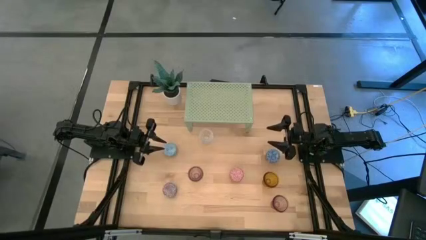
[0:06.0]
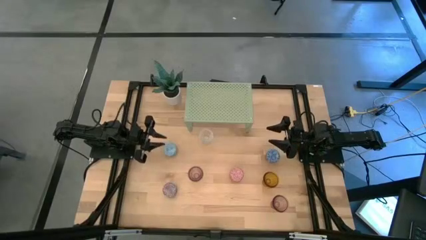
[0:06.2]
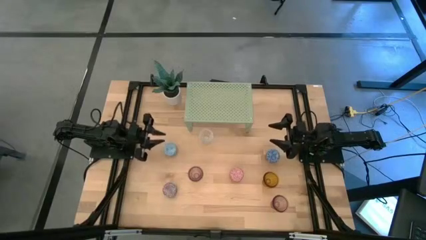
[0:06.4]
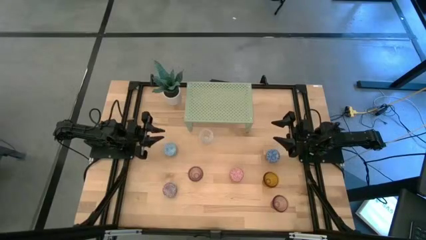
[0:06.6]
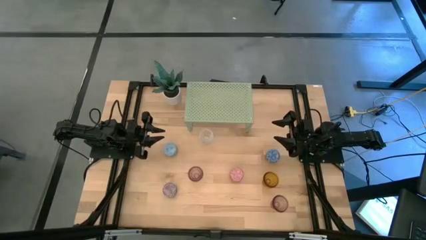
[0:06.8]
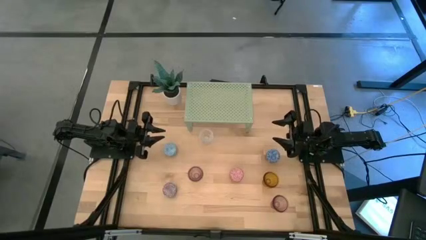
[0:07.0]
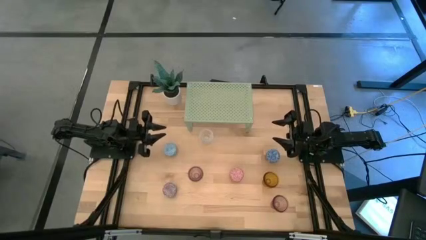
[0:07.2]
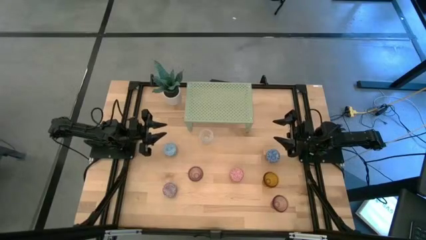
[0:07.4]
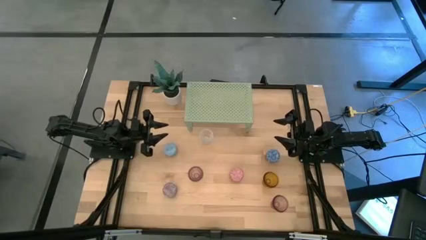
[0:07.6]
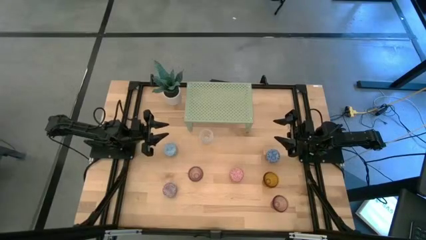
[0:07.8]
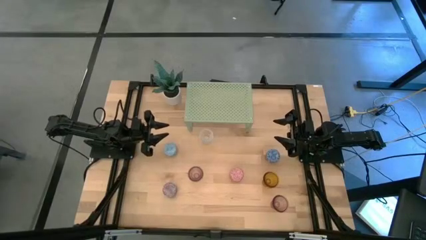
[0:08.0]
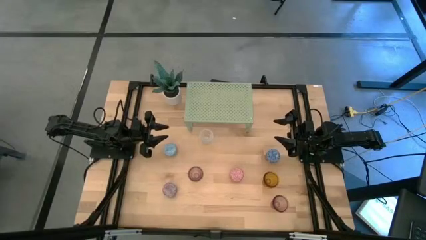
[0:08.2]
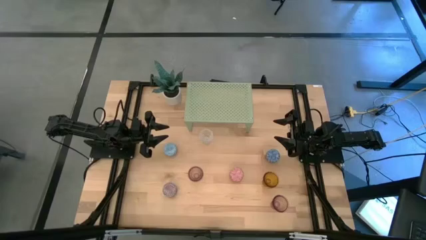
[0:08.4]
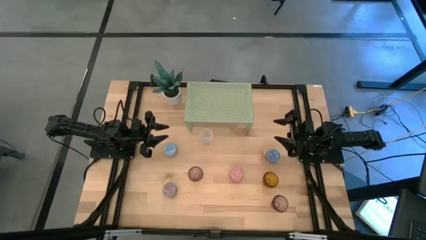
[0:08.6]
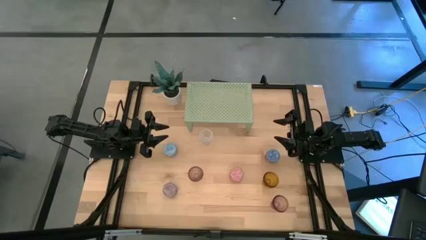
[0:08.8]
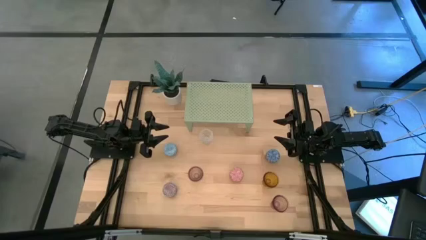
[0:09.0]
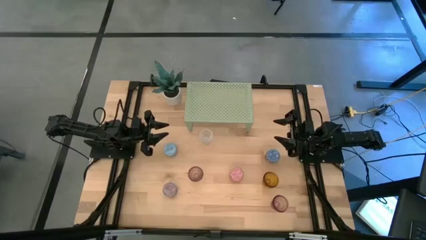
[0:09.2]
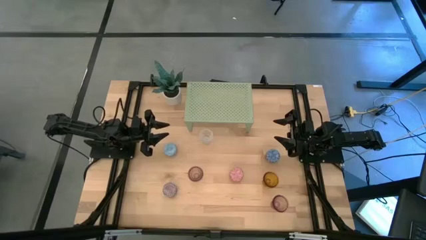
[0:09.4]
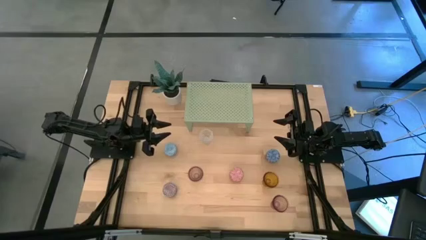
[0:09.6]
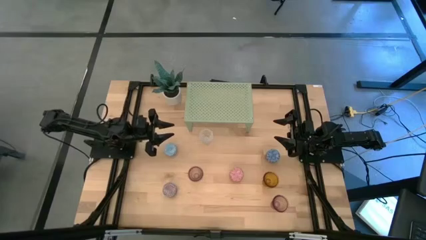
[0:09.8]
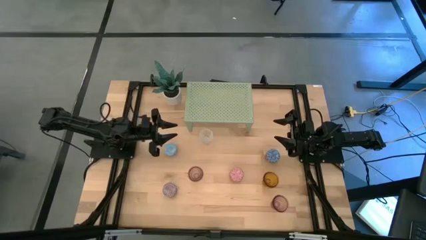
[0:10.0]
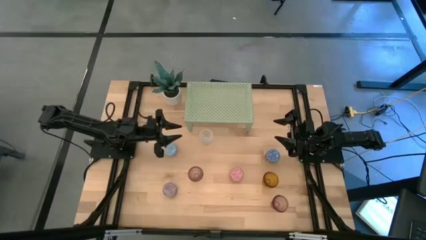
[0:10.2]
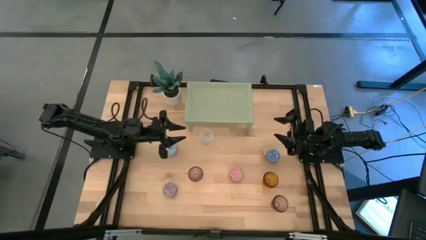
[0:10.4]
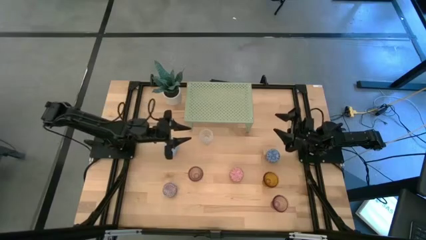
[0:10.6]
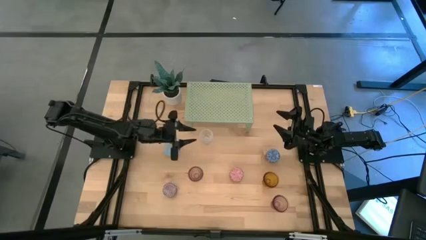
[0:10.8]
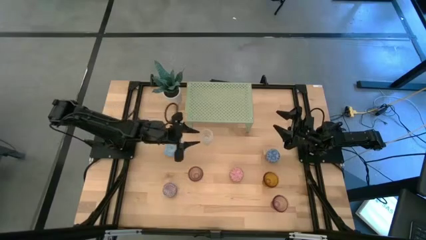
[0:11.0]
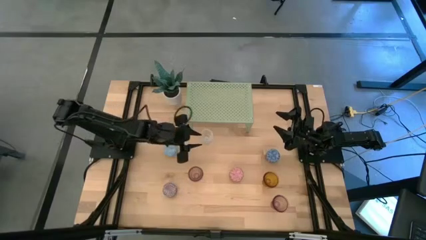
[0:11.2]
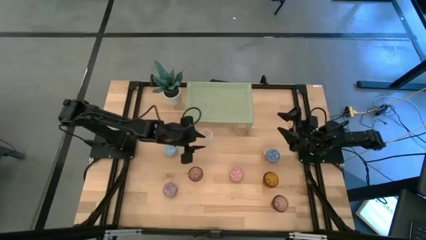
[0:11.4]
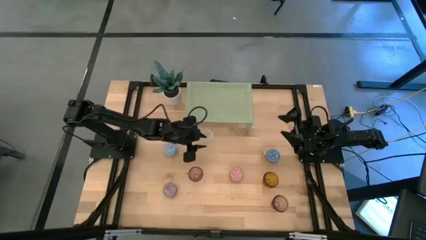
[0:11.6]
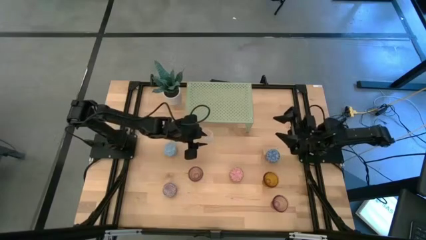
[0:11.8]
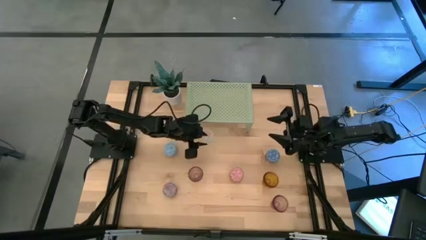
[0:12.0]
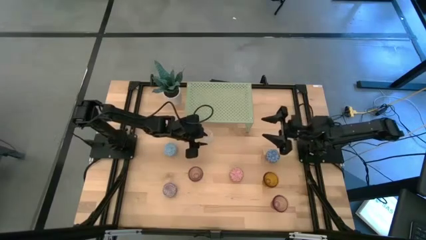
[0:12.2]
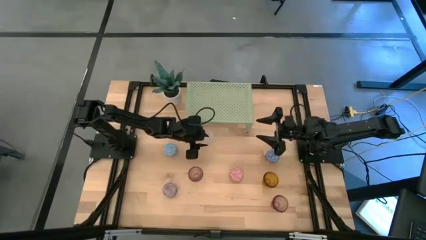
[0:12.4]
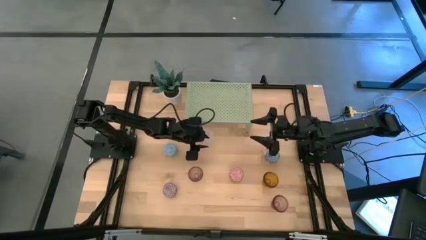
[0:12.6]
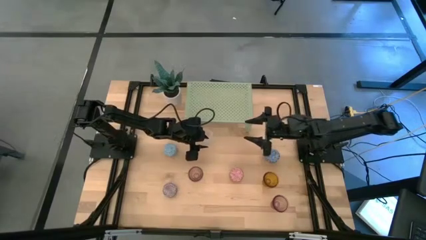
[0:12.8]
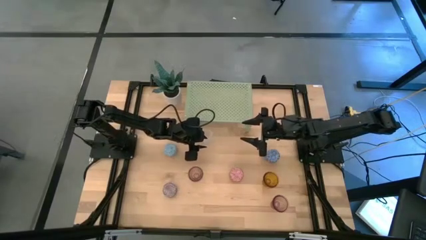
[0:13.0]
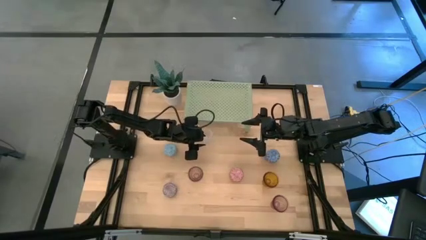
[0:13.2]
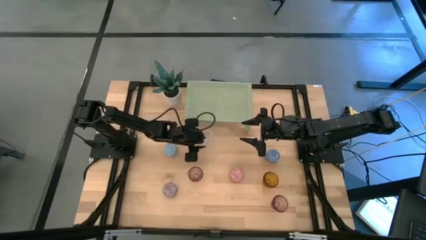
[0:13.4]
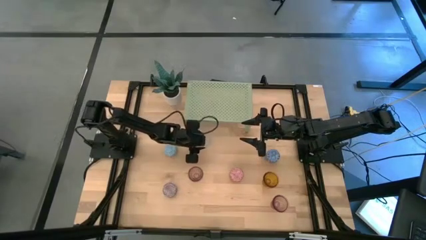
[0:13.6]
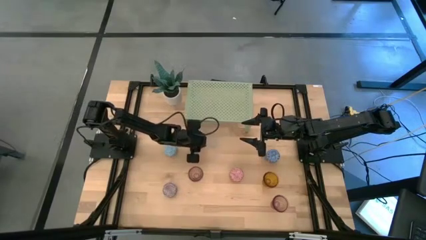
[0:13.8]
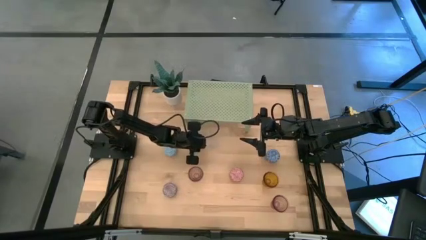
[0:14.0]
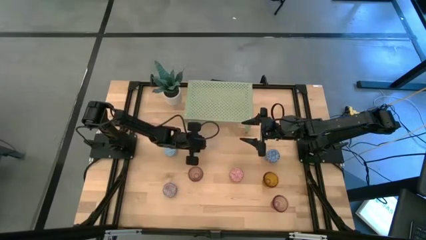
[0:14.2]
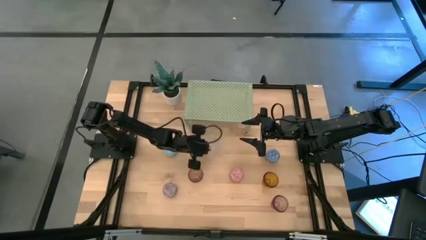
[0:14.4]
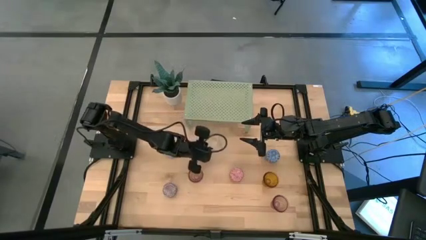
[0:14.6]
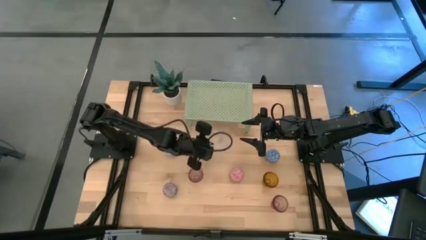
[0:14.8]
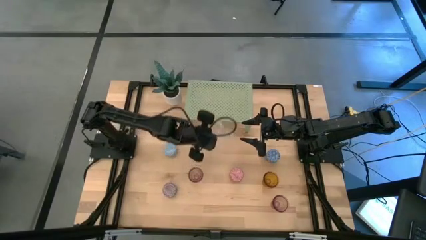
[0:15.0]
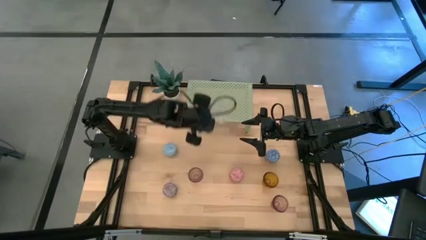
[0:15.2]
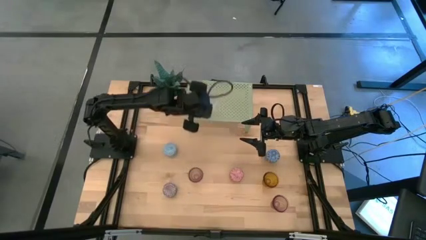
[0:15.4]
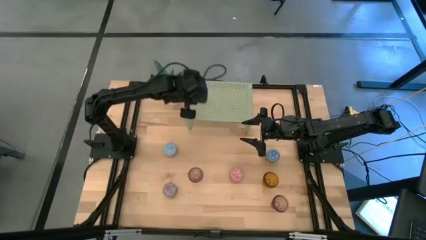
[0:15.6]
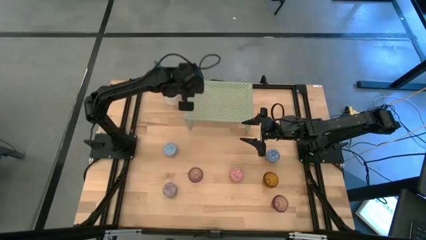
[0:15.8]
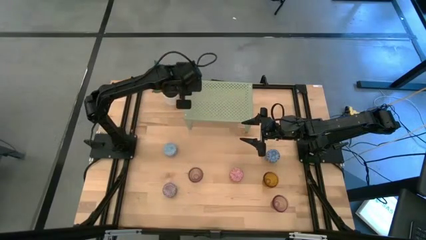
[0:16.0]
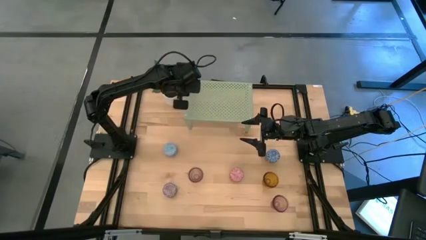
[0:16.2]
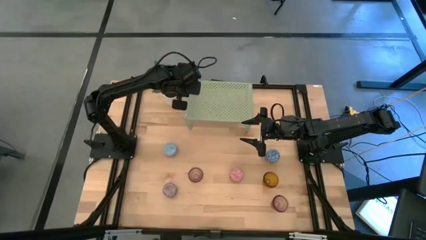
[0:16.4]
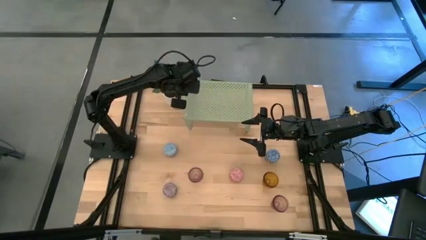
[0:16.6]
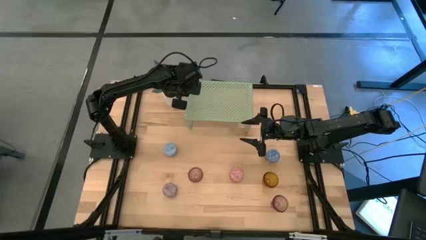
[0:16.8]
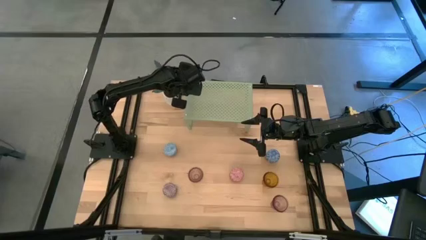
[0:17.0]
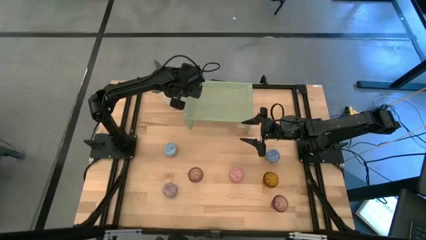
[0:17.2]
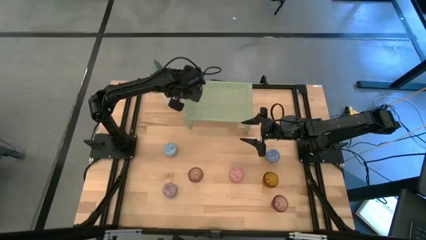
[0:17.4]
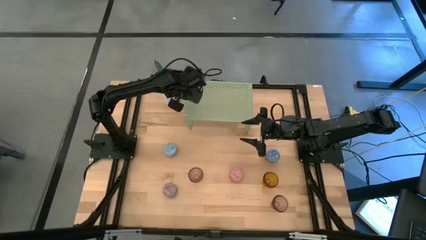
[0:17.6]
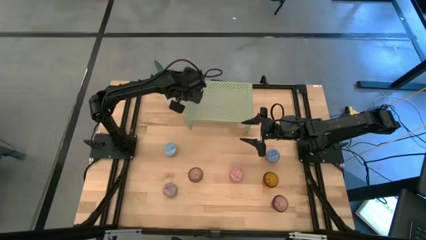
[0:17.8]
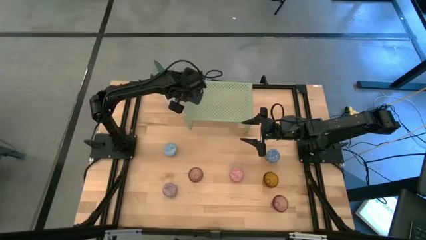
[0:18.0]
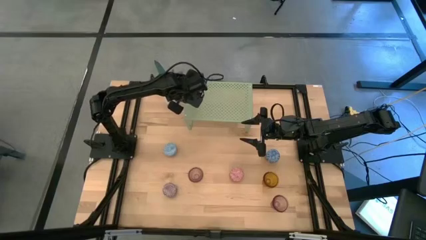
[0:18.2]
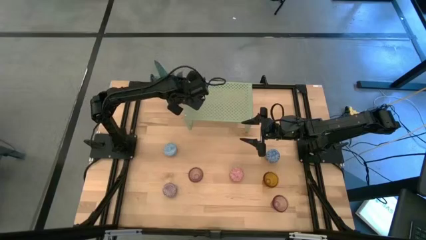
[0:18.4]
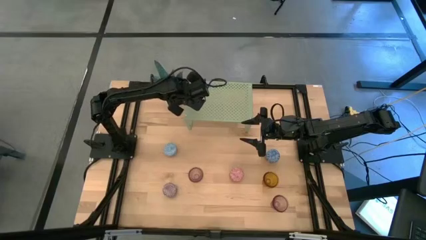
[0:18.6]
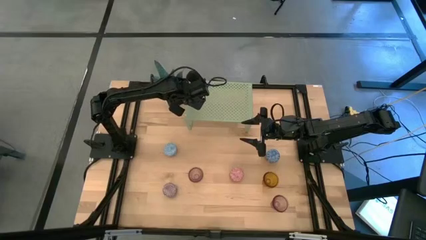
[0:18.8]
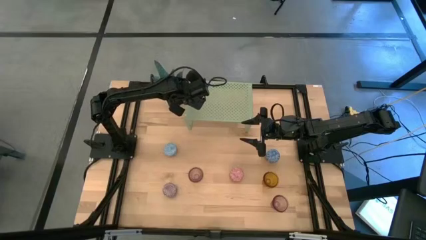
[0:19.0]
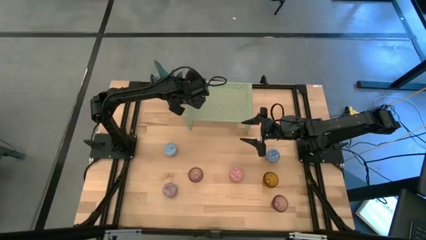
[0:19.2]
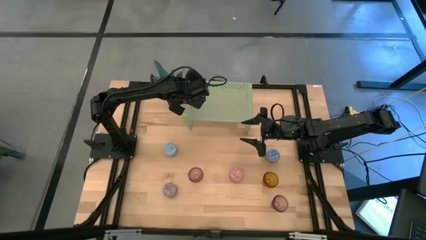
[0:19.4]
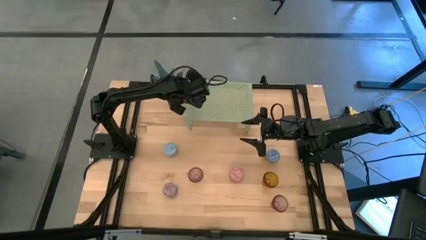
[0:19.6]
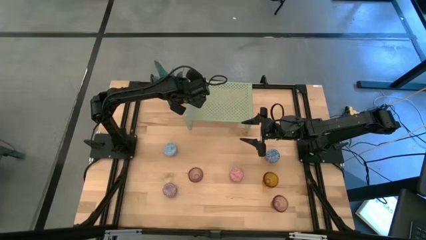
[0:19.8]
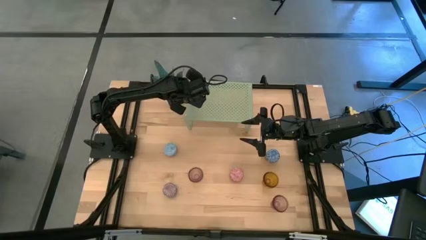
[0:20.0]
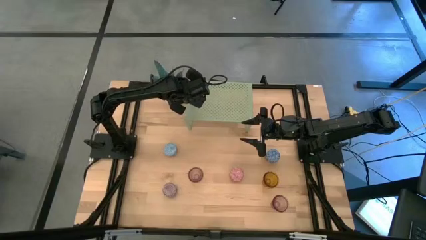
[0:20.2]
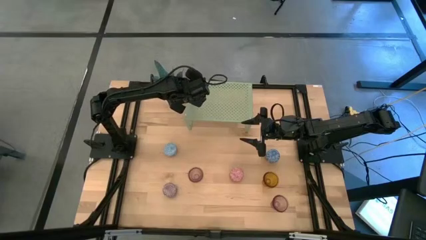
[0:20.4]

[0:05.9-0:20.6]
Task: Pick & Place candle stick holders
Put the transparent glass candle holder on the shelf
